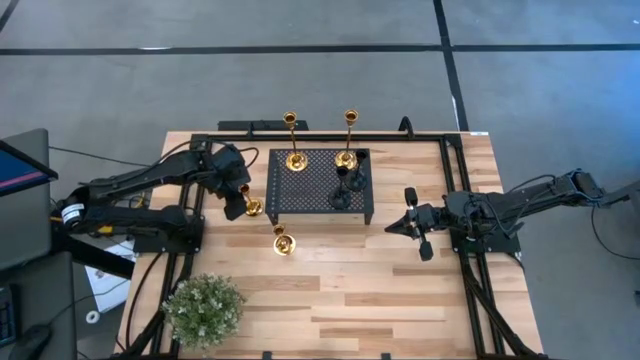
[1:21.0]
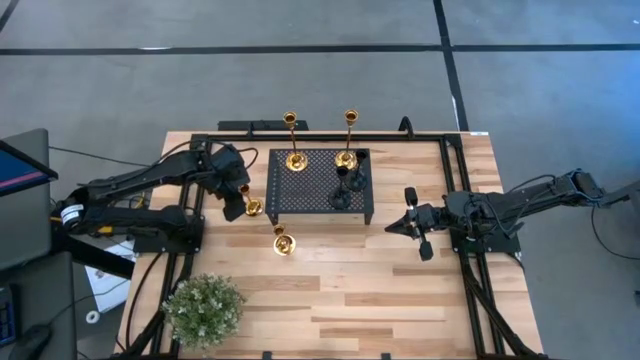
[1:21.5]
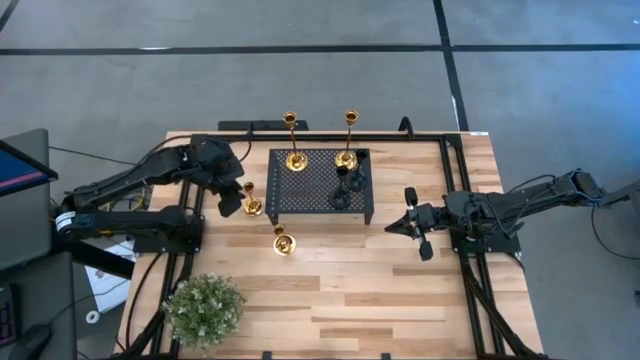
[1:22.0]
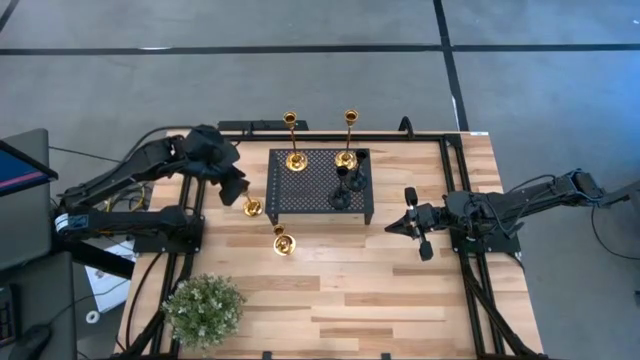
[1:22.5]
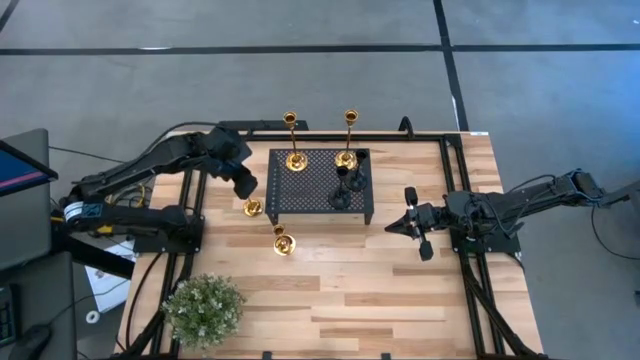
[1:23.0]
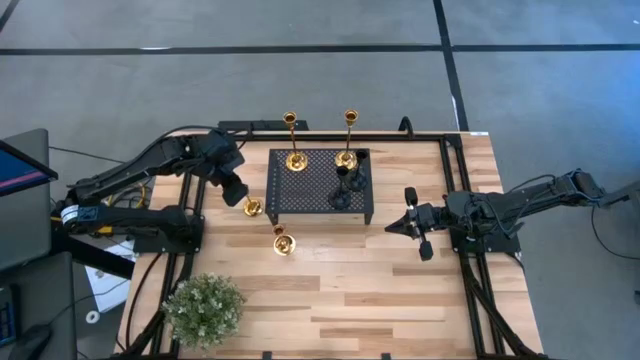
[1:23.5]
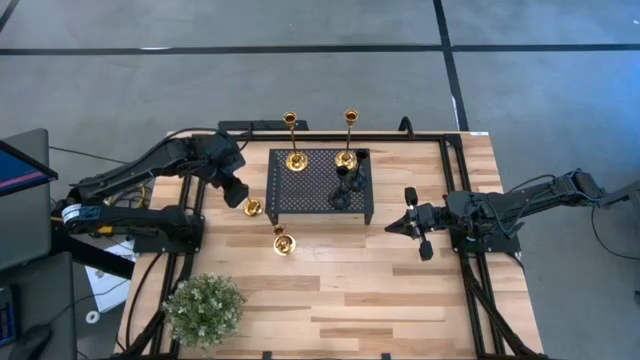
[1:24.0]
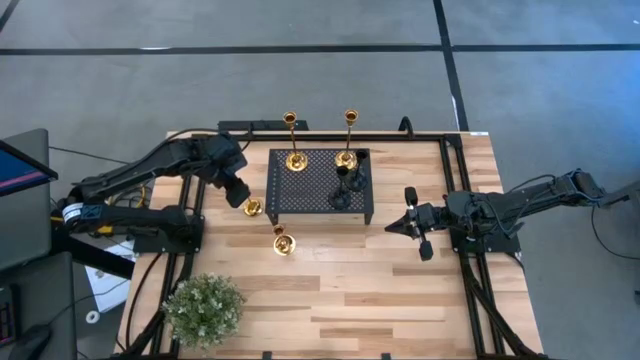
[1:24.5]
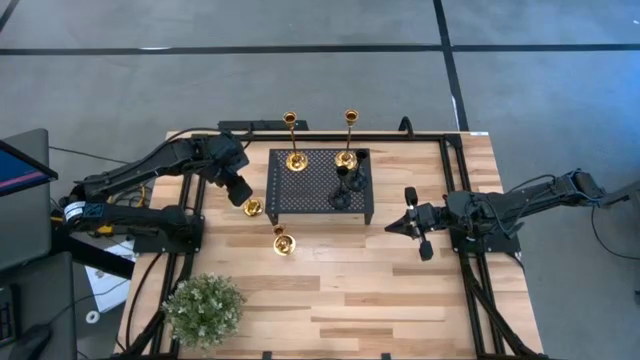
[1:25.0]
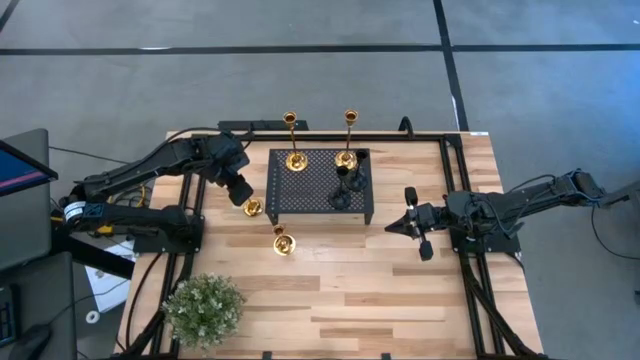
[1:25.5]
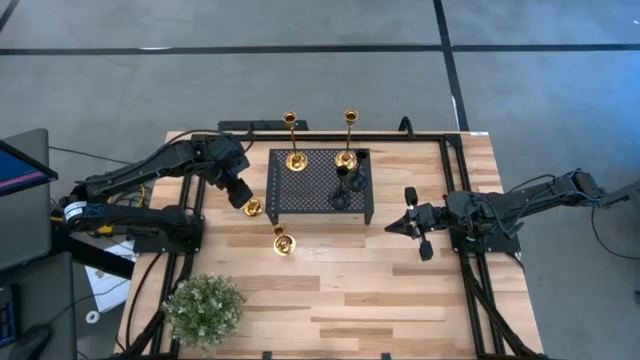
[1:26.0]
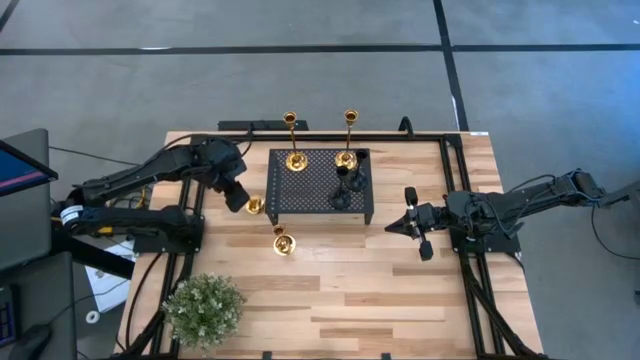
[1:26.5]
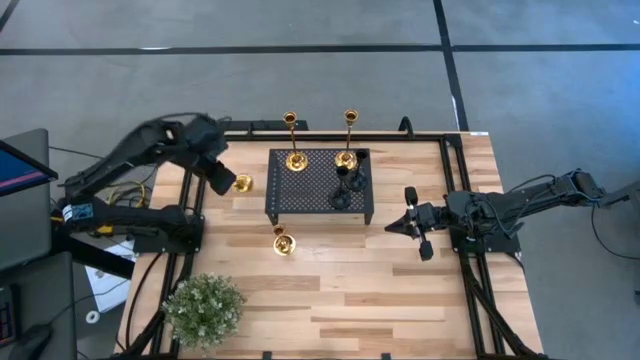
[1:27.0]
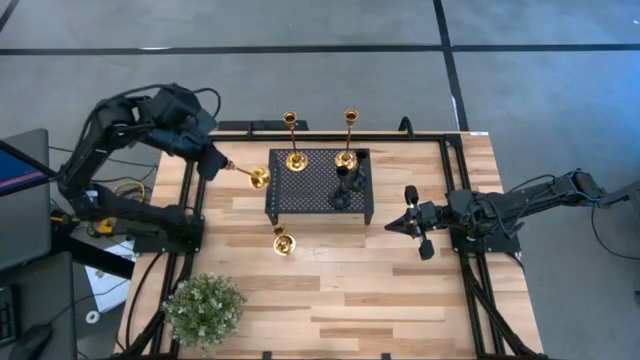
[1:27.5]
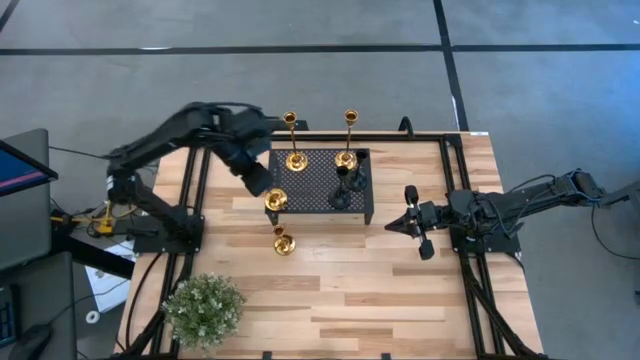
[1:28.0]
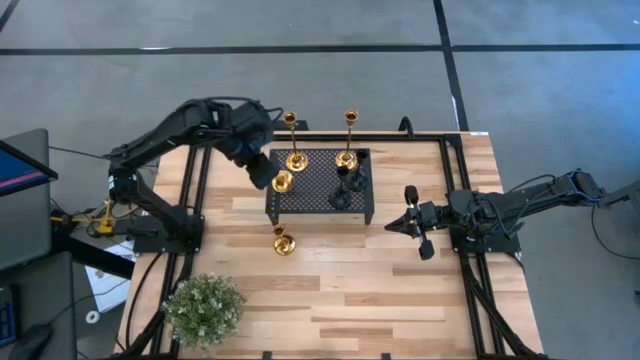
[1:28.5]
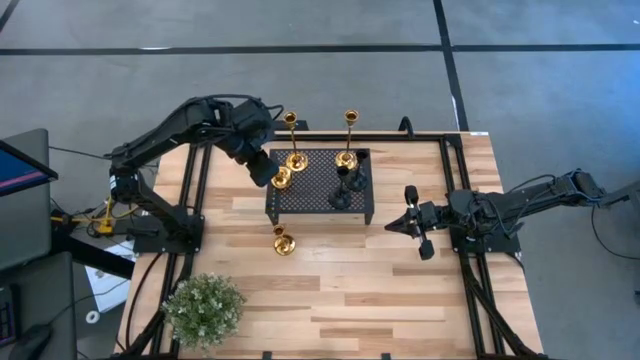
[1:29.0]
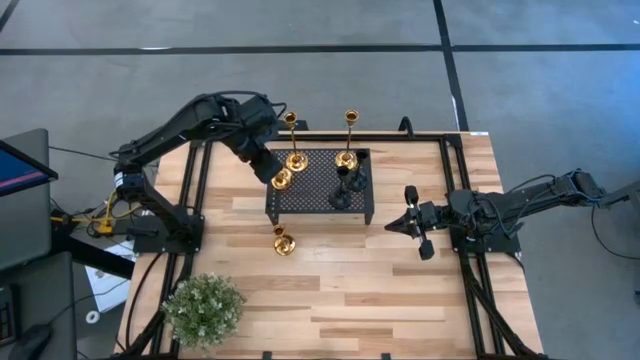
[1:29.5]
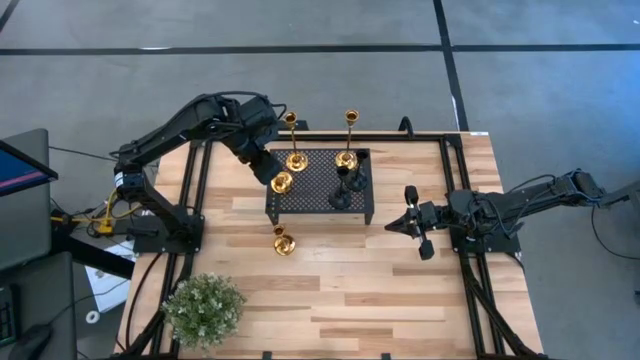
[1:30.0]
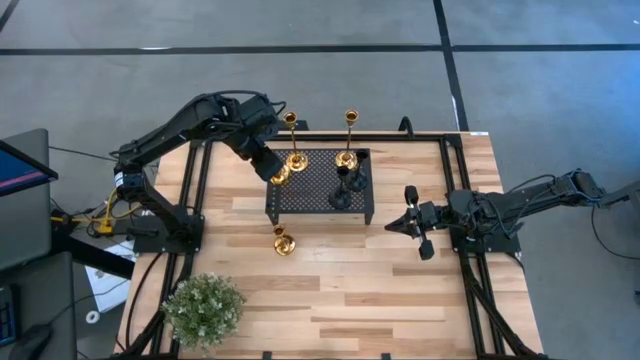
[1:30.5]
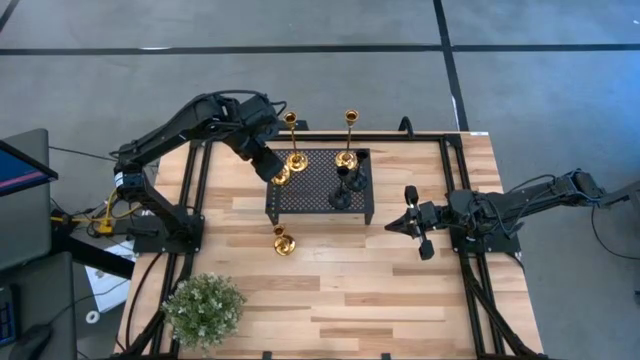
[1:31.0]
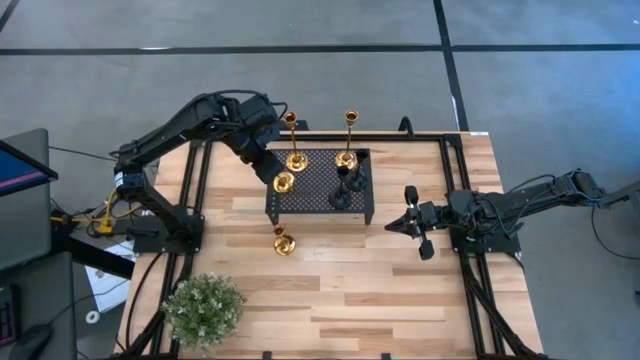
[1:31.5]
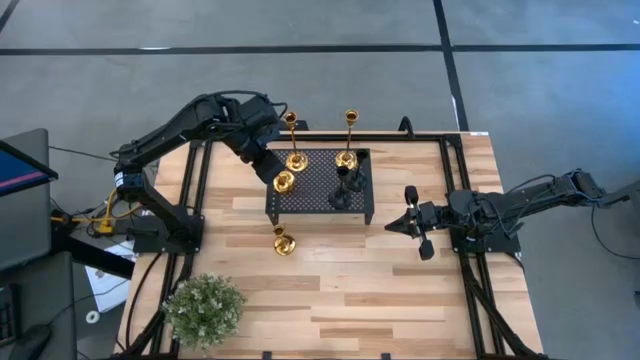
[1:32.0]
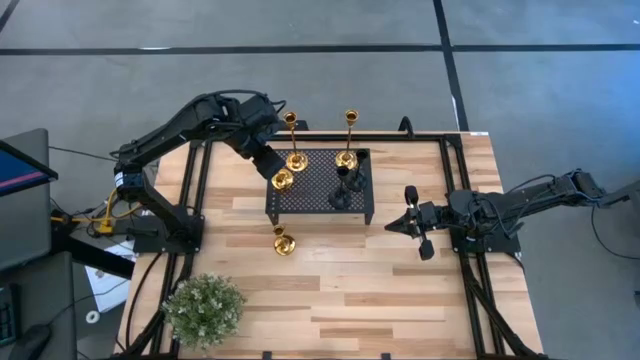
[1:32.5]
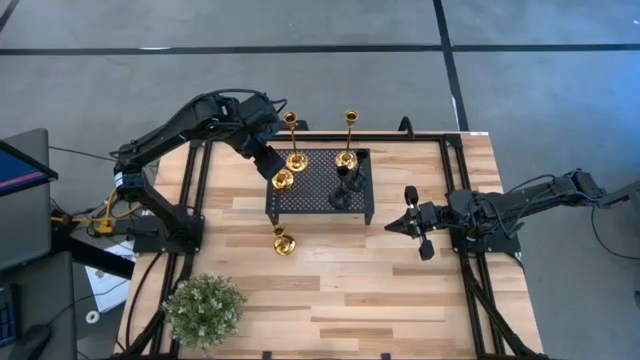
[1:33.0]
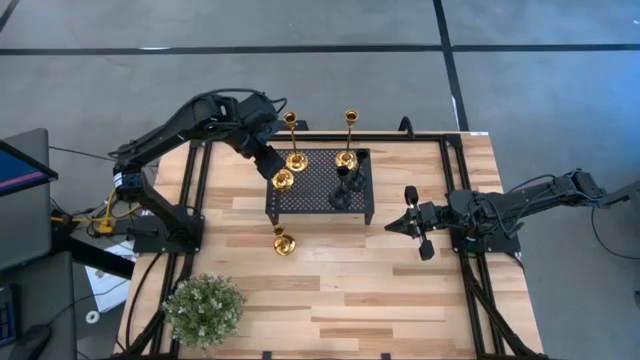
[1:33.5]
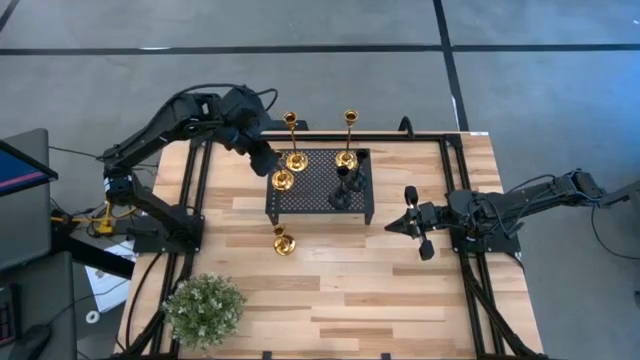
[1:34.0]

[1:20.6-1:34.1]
Task: Pick & Place candle stick holders
Put the golden candle holder on the shelf

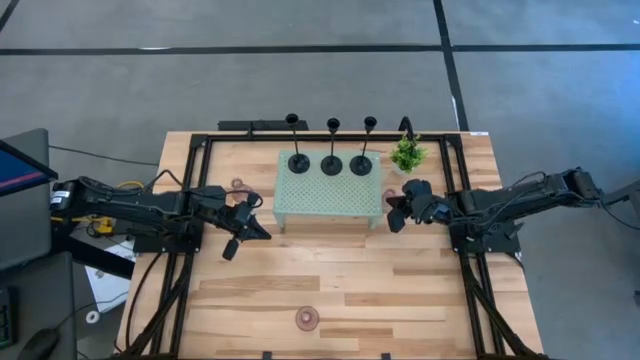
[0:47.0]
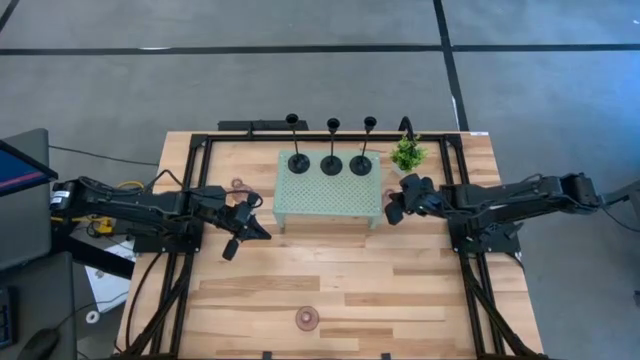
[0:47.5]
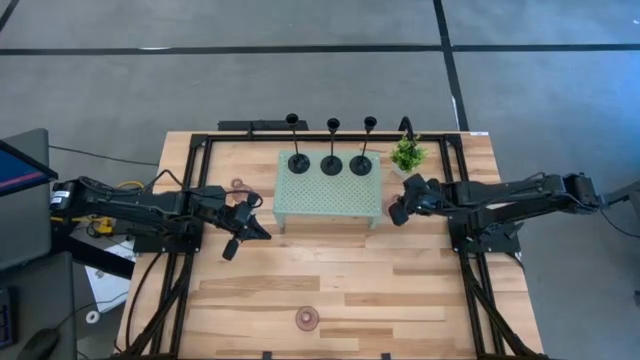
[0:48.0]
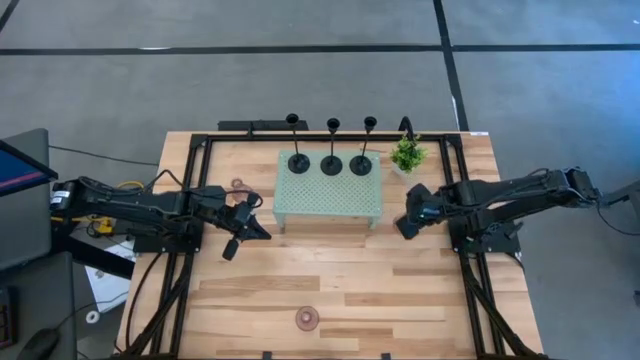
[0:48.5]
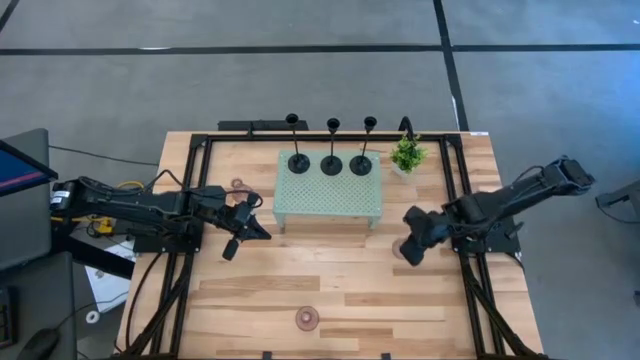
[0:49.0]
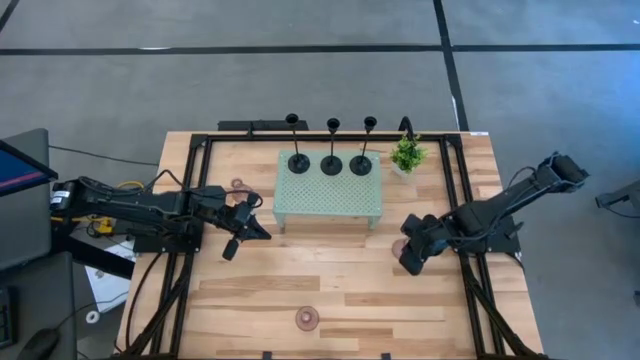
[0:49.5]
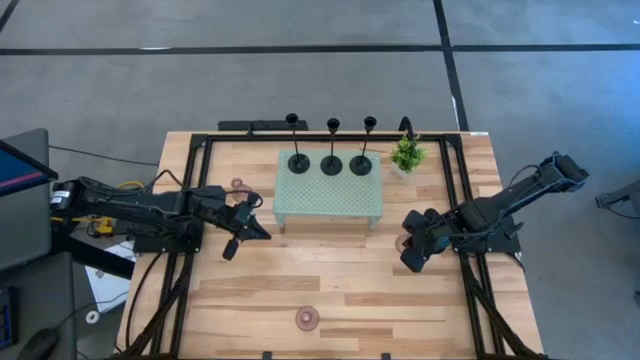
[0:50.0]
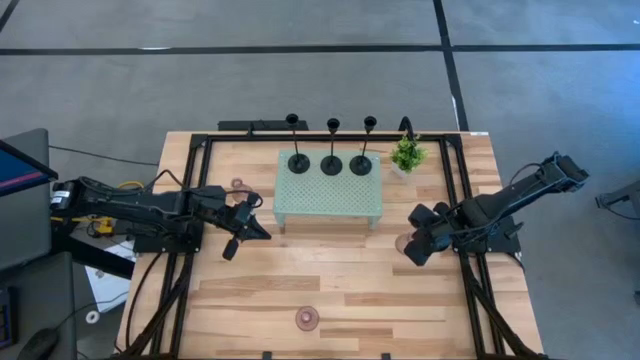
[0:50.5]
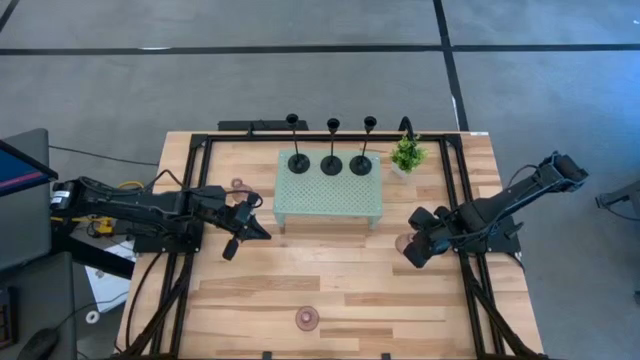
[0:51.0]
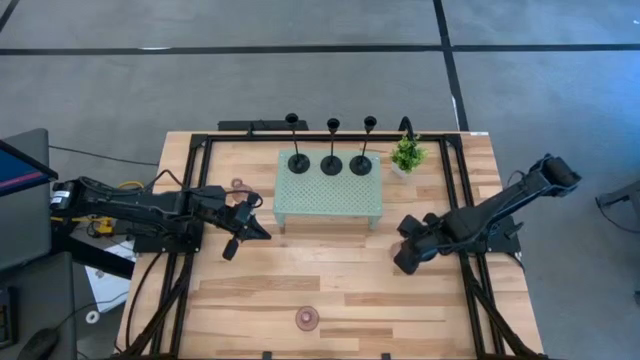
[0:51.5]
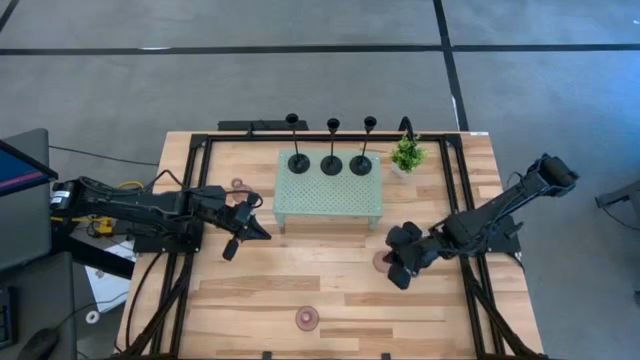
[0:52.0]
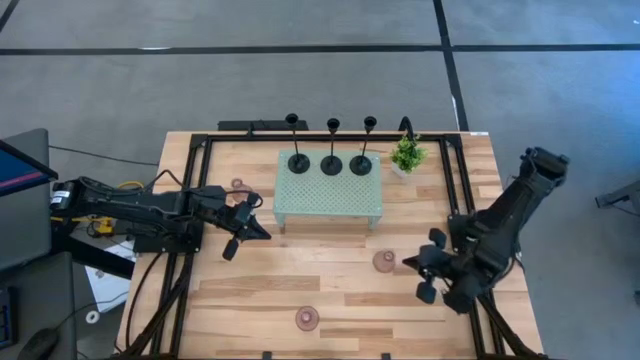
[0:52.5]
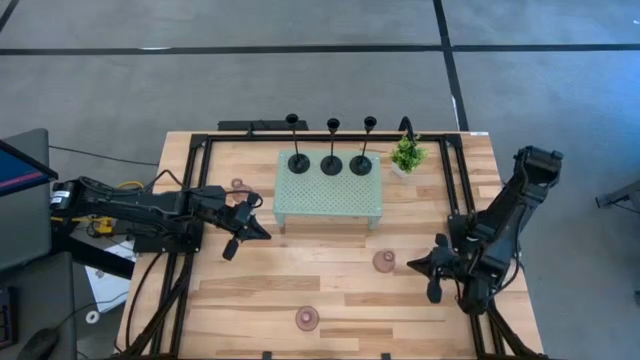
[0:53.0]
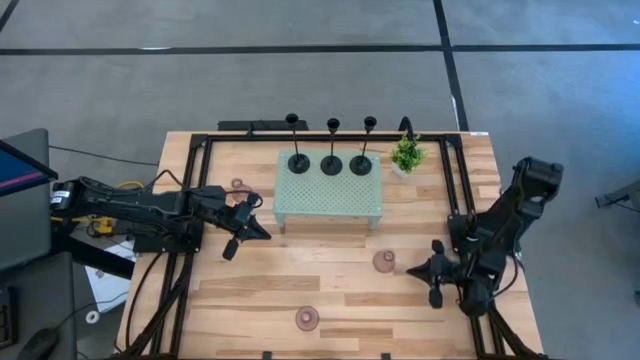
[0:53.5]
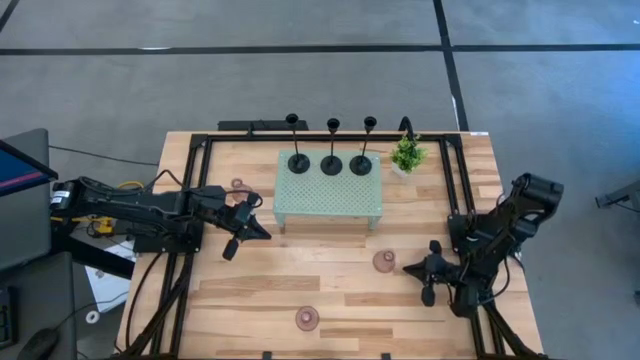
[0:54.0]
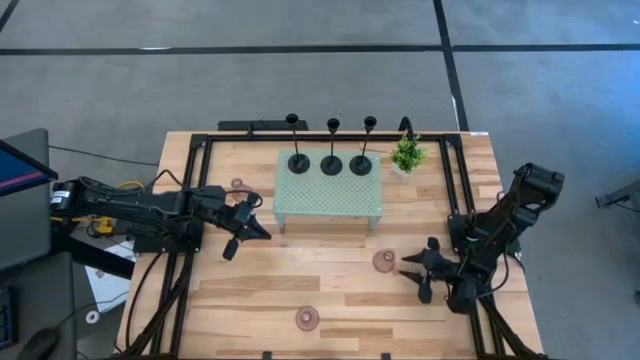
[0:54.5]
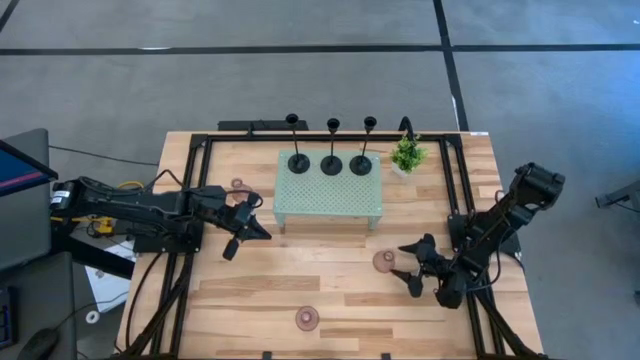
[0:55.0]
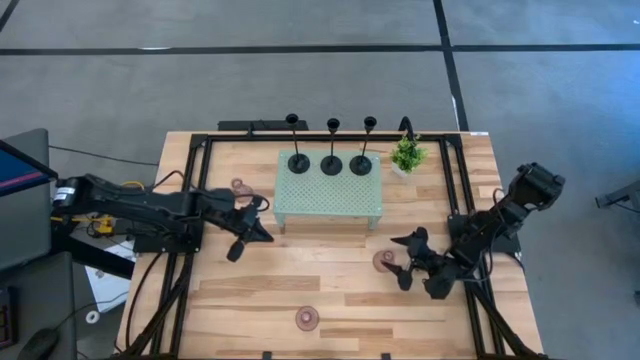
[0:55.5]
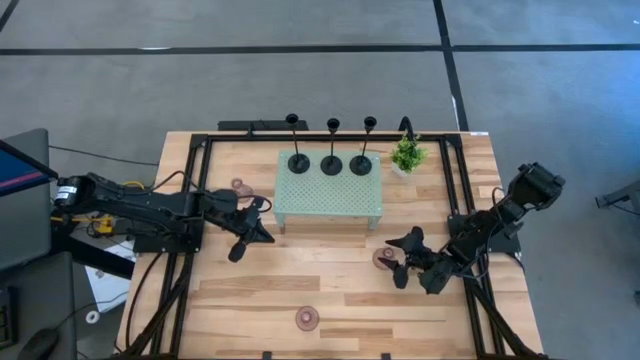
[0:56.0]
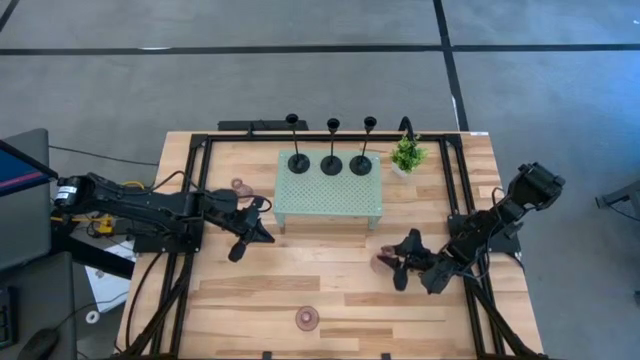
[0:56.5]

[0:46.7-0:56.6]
Task: Pick & Place candle stick holders
Put the top right glass candle holder on the shelf aligned with the other black candle holder
